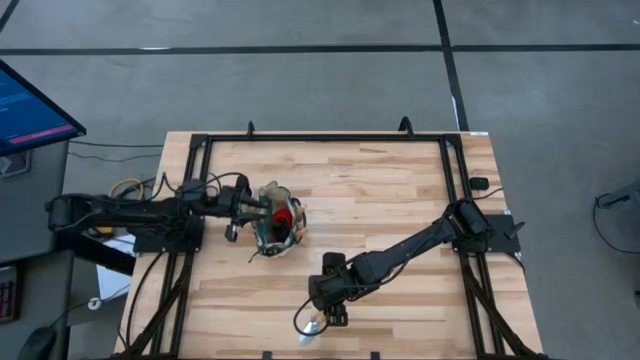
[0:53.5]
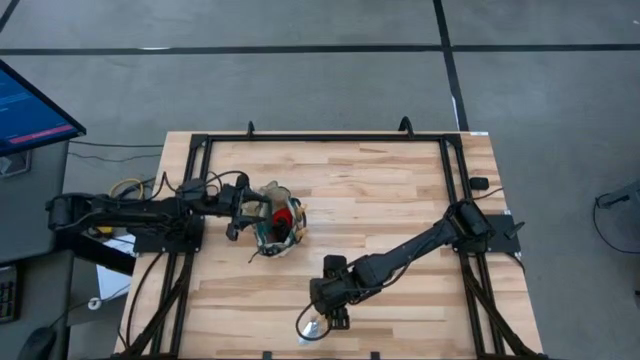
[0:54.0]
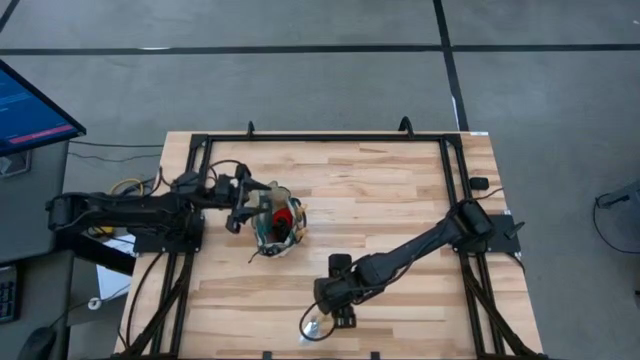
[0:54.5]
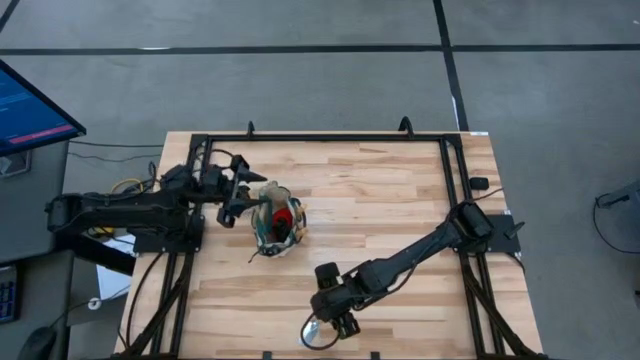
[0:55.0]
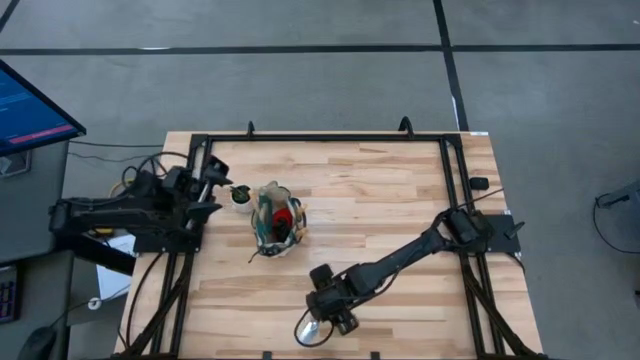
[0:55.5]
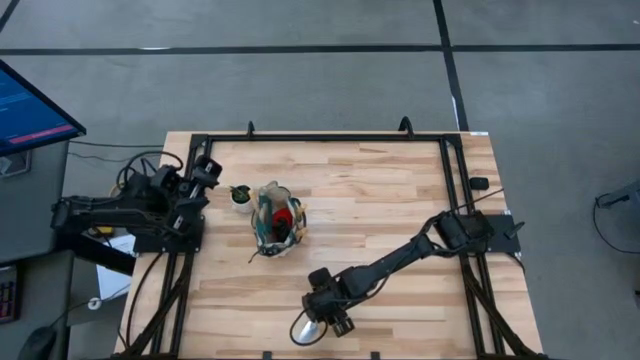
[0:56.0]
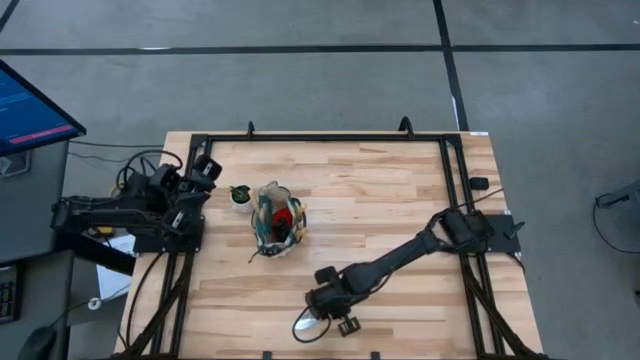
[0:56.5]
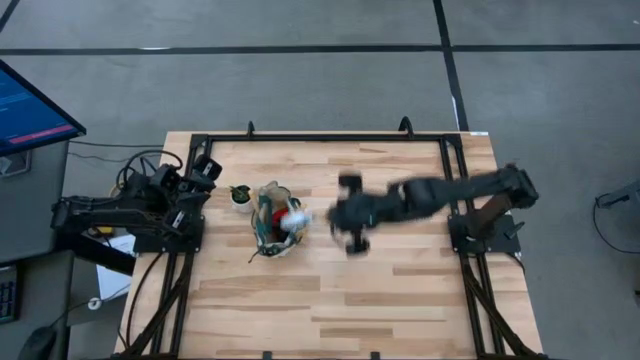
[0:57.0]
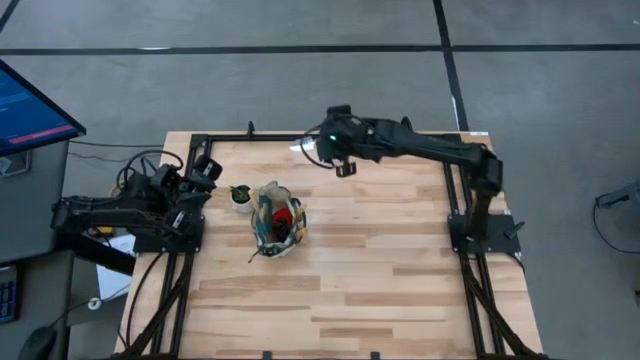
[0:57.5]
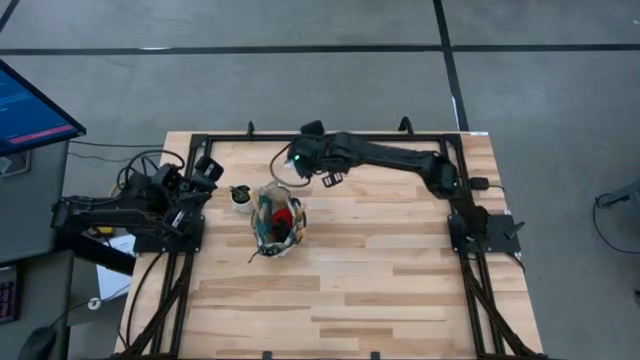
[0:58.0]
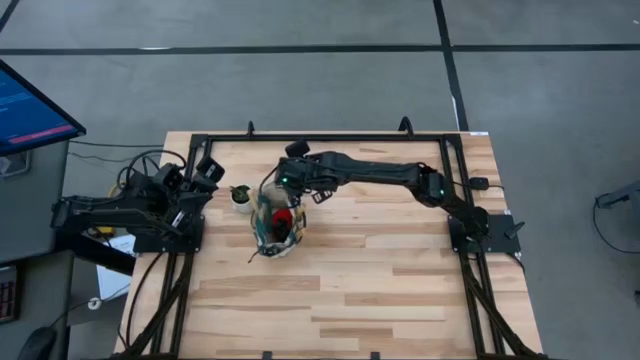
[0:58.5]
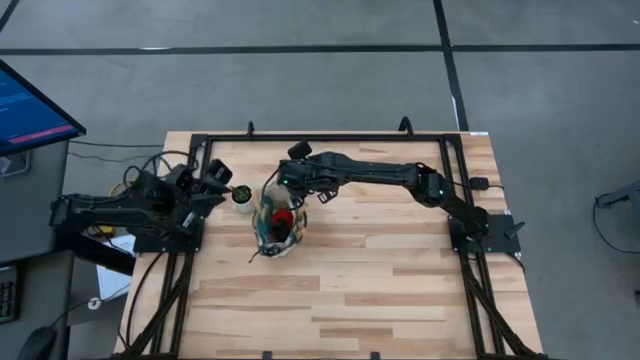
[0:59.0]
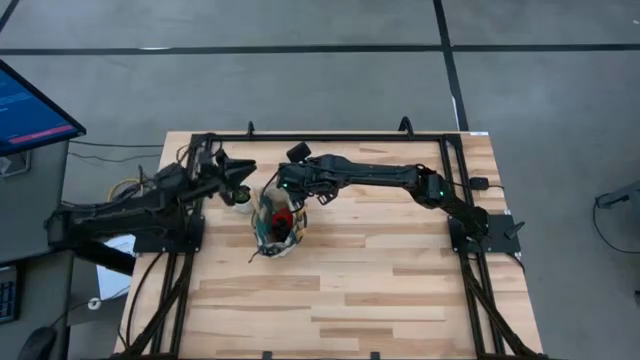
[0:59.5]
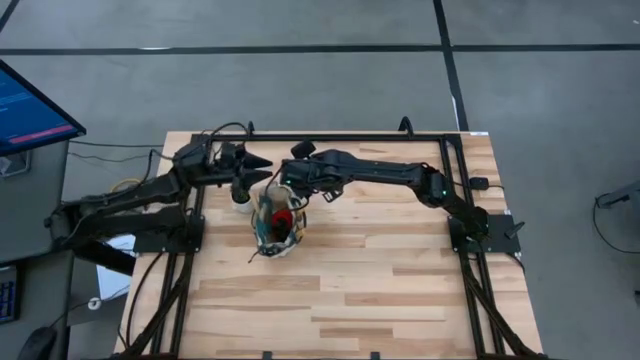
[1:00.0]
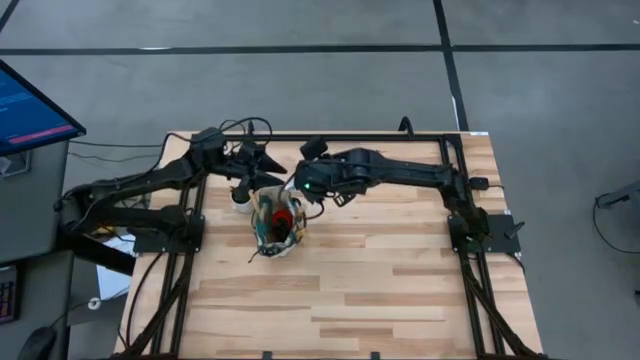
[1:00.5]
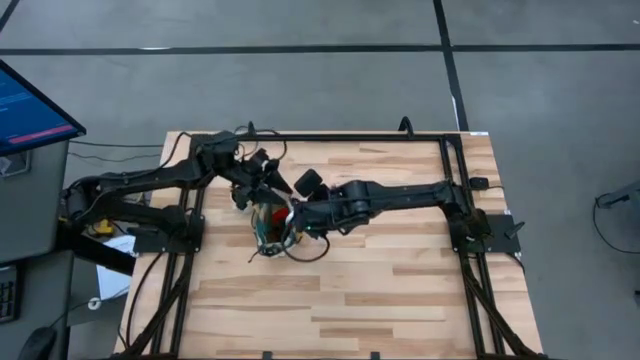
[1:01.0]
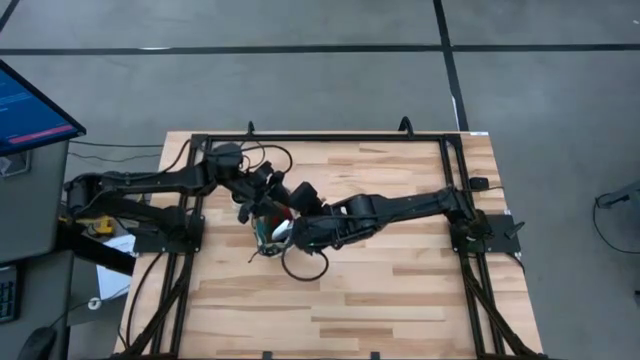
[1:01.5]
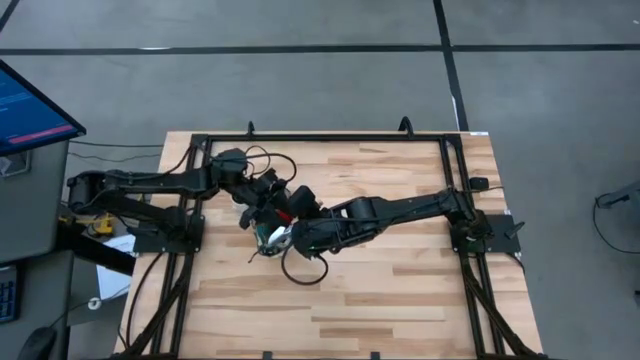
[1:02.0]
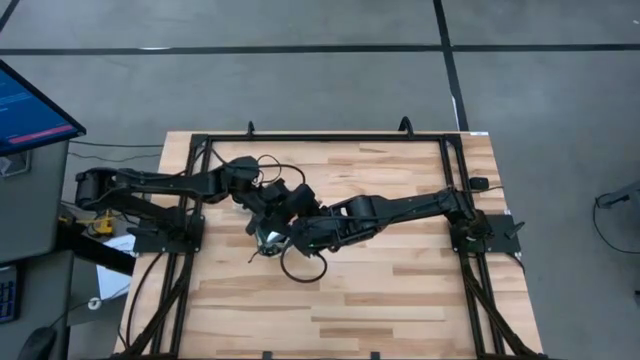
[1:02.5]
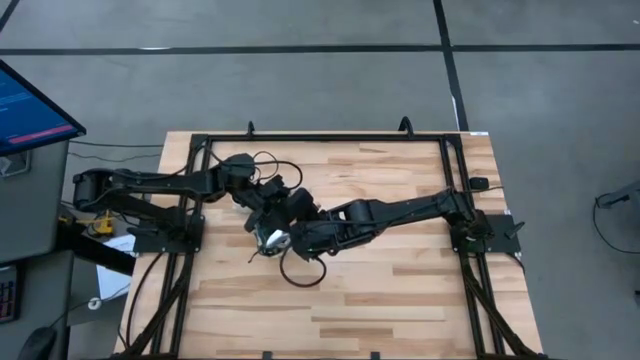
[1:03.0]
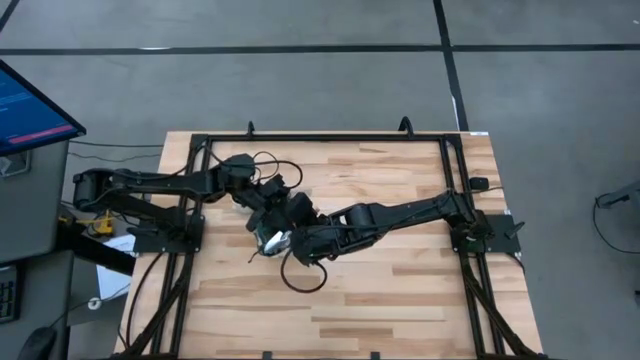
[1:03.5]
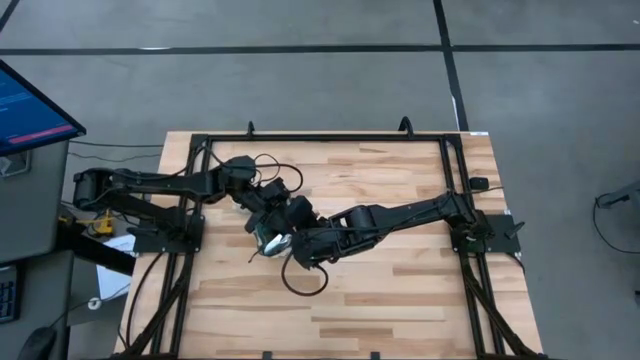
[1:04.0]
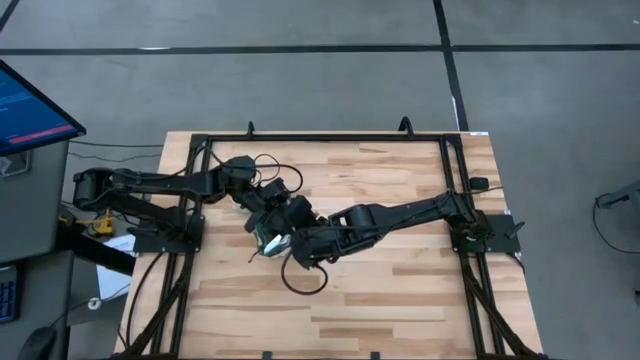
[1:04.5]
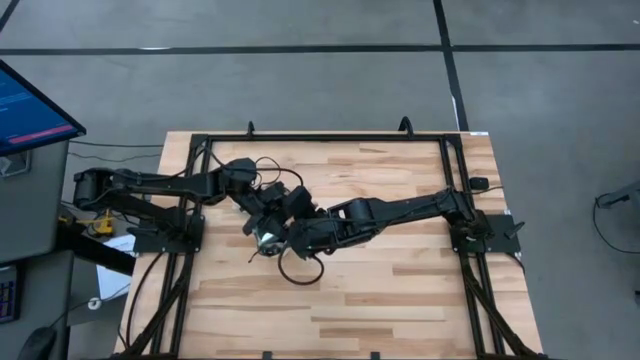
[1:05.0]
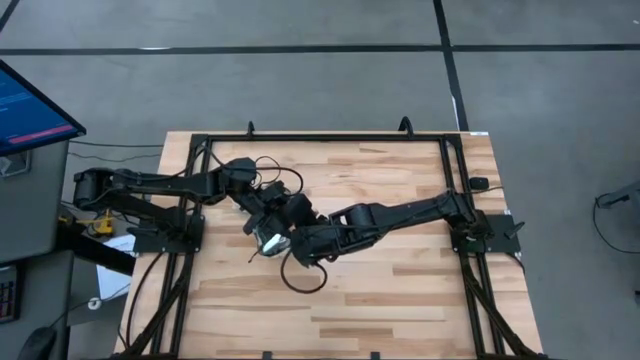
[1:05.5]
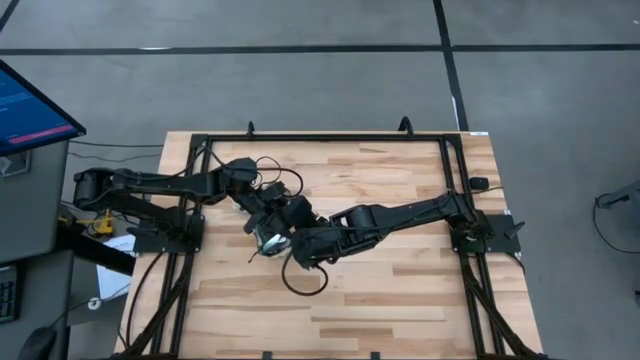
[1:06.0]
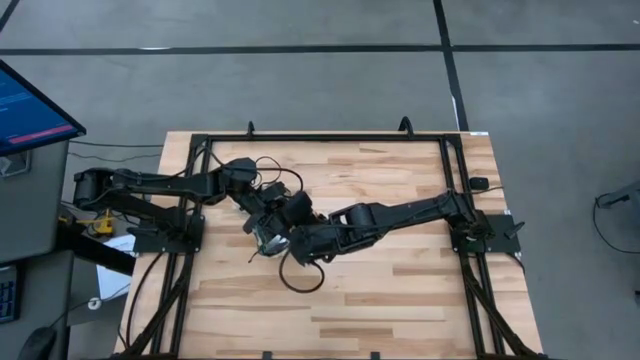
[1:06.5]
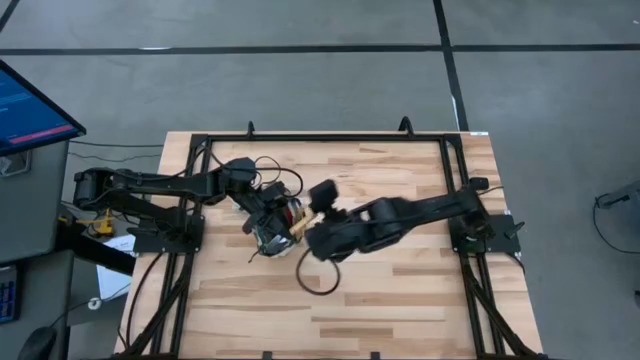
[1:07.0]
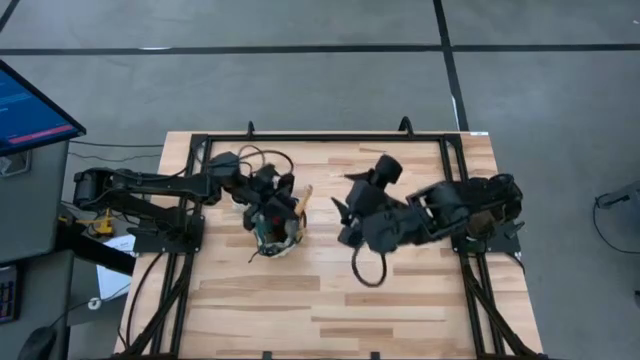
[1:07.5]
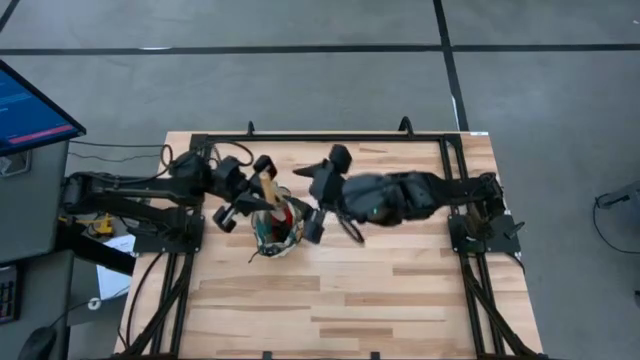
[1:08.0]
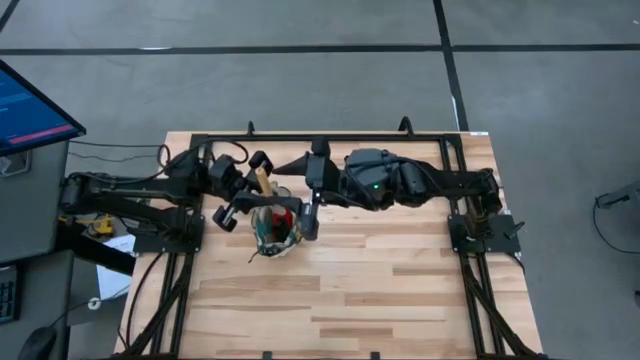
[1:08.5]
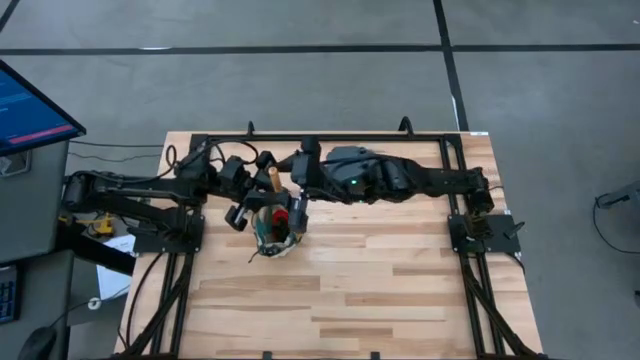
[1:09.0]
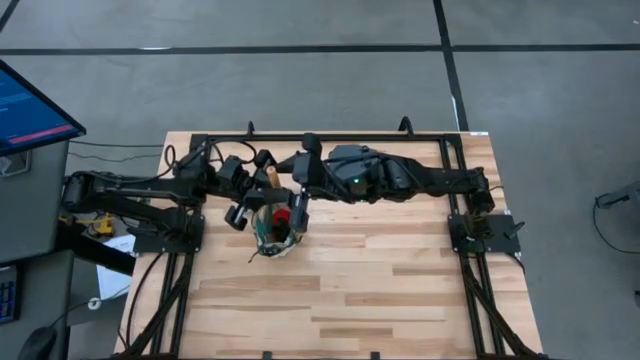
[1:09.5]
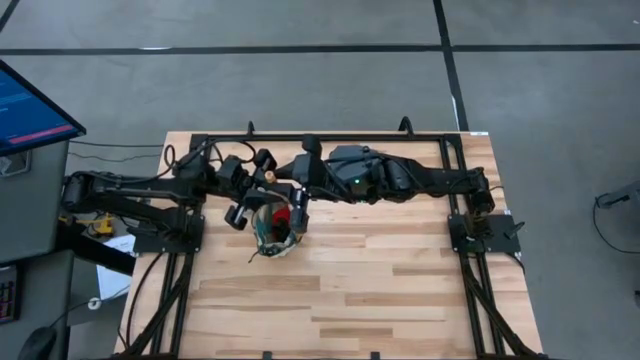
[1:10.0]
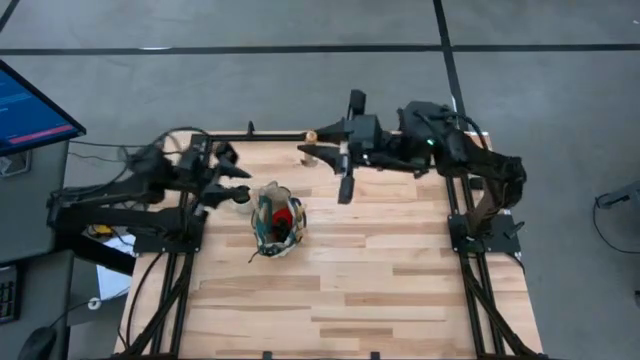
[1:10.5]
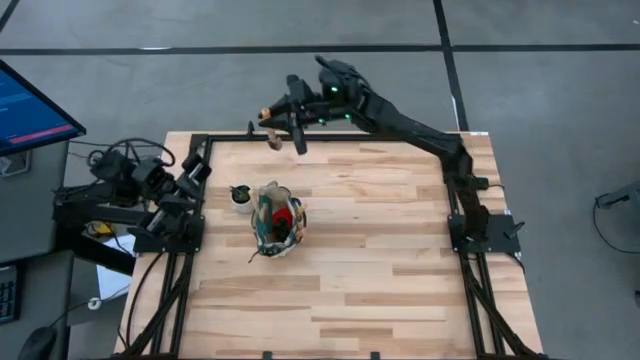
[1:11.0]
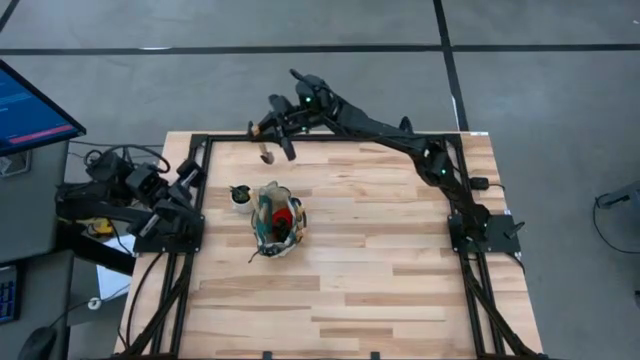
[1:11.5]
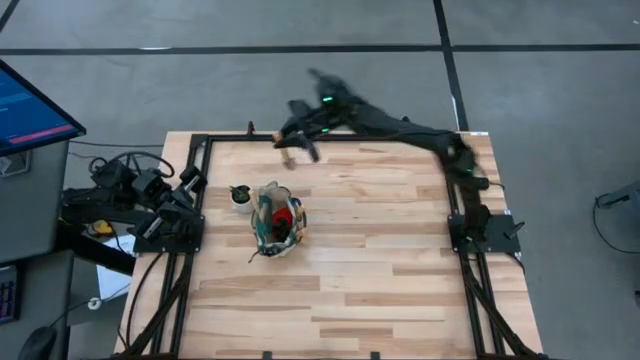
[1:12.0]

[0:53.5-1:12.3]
Task: Pick & Place Garden tools in Gardening bag
Put the trowel into the gardening bag

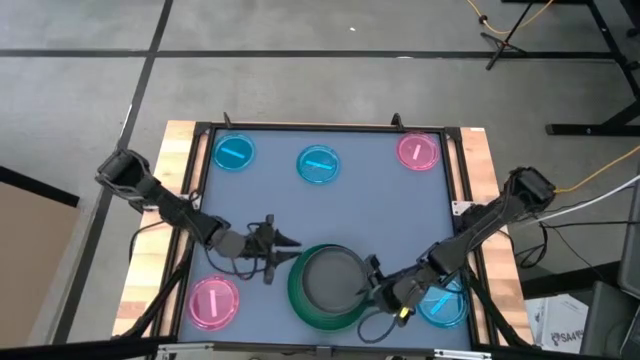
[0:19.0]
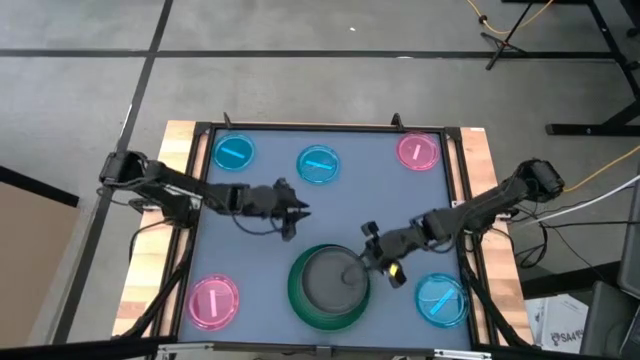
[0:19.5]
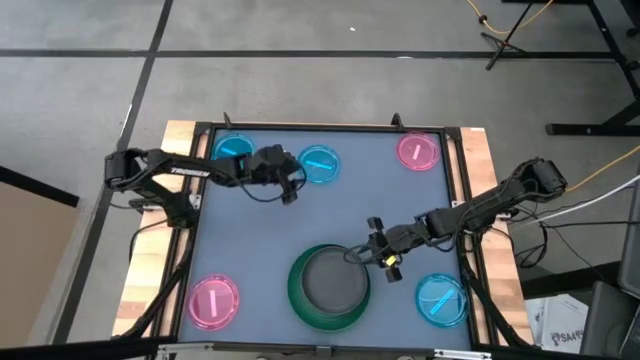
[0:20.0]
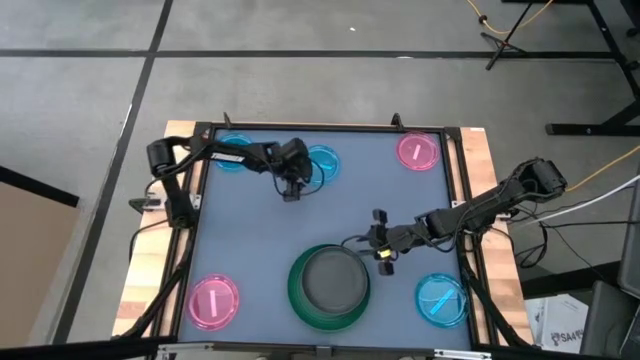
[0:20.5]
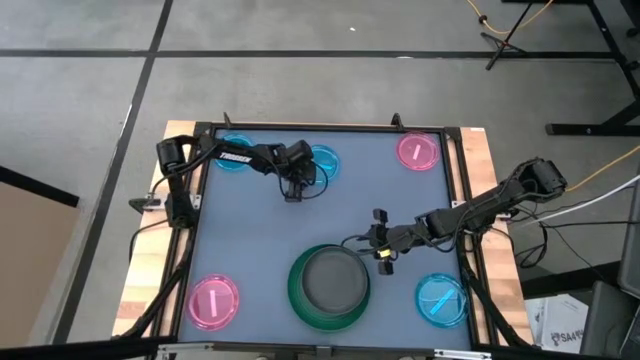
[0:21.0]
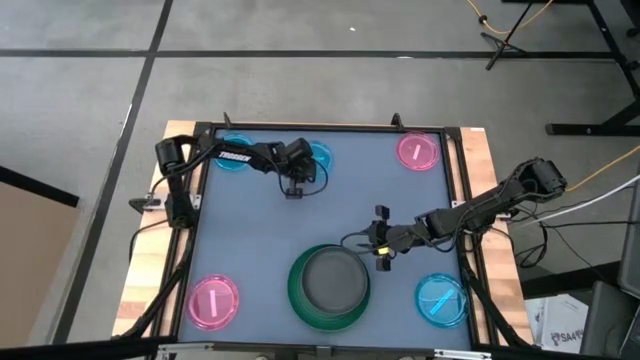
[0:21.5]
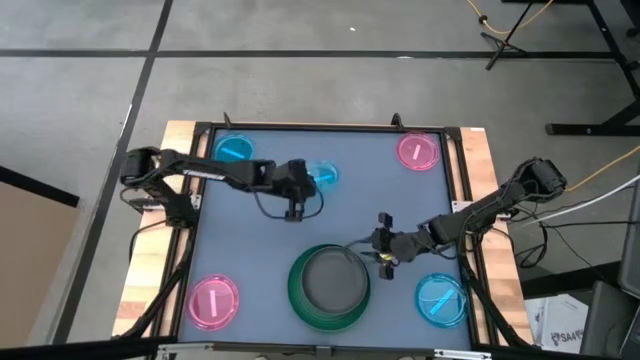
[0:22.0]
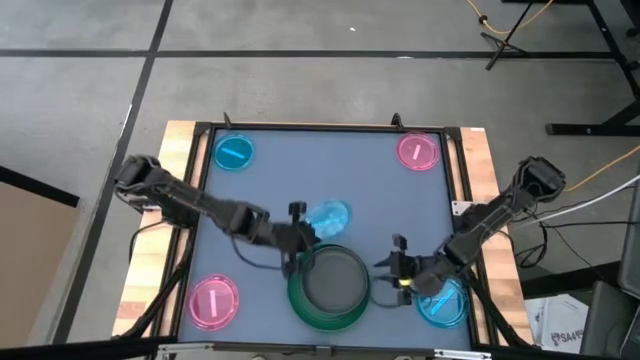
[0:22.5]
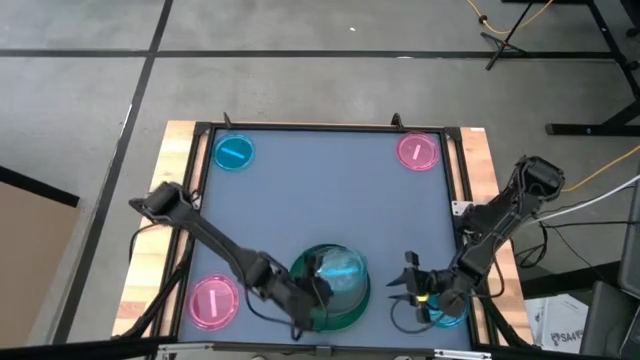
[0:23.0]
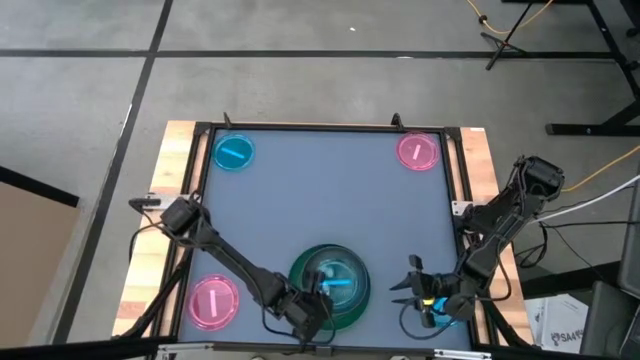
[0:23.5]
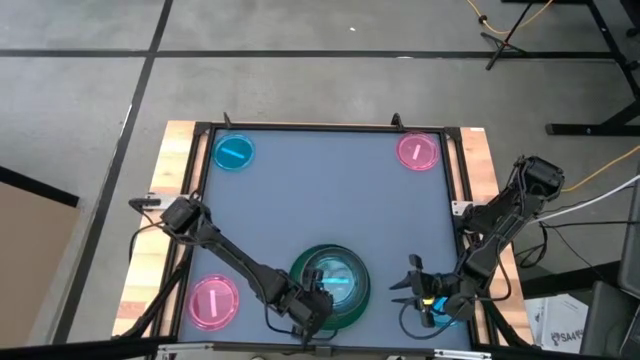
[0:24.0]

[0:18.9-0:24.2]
Task: Stack plastic plates
Stack the top right blue plate on top of the black plate
